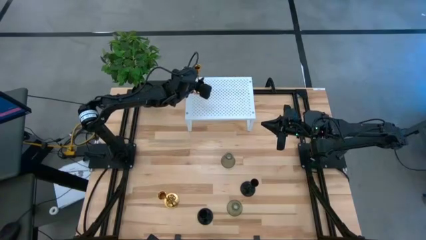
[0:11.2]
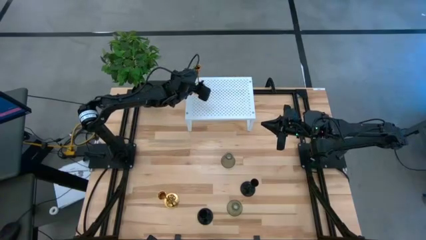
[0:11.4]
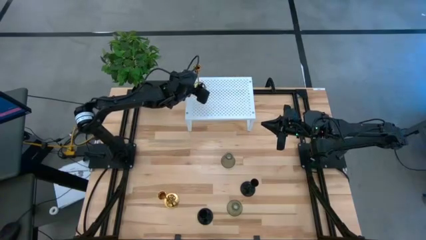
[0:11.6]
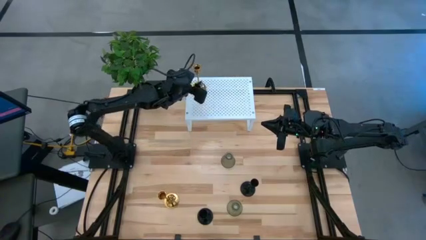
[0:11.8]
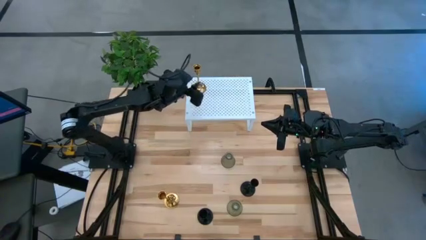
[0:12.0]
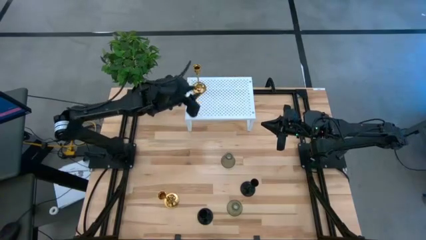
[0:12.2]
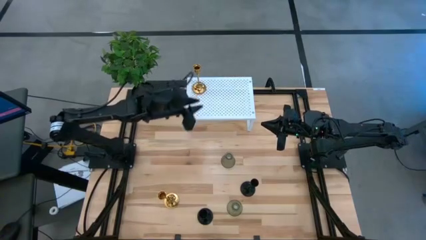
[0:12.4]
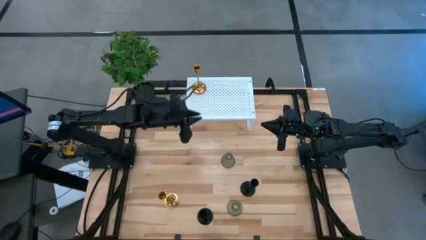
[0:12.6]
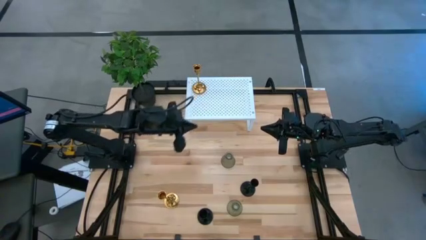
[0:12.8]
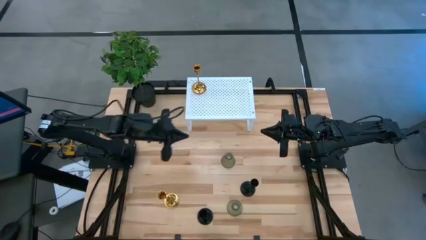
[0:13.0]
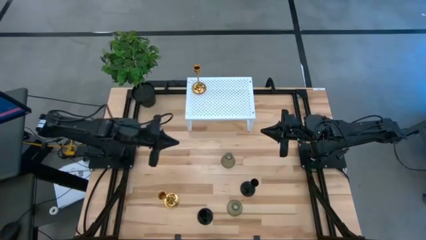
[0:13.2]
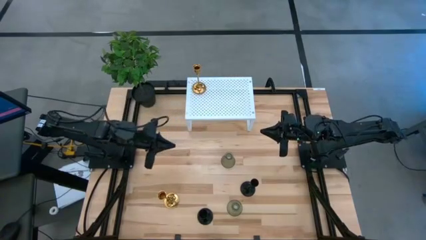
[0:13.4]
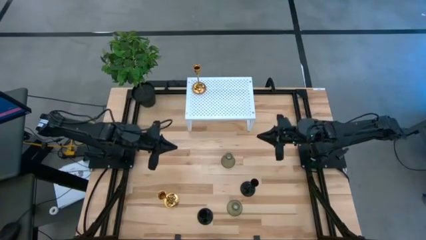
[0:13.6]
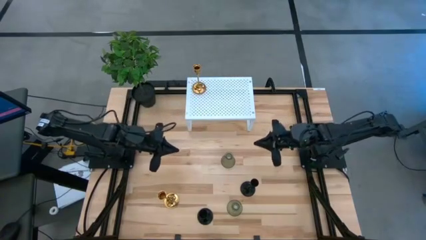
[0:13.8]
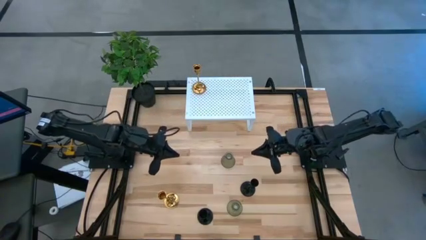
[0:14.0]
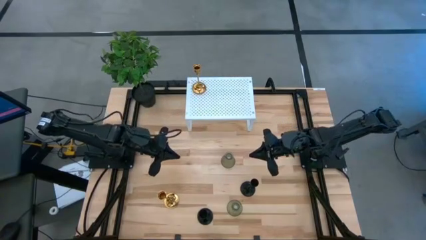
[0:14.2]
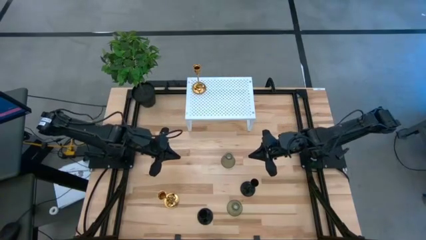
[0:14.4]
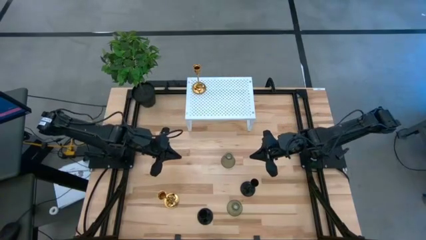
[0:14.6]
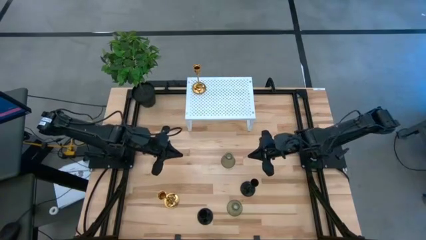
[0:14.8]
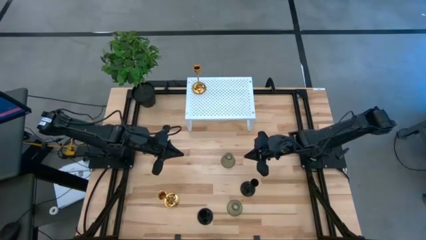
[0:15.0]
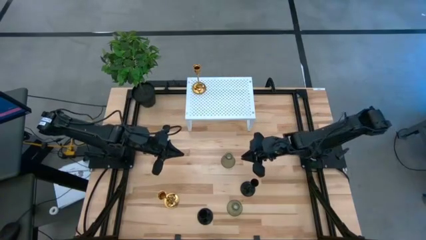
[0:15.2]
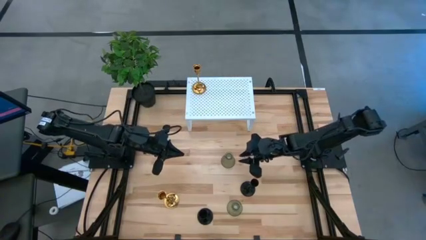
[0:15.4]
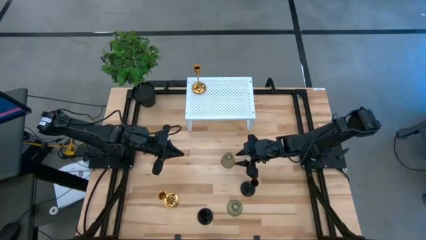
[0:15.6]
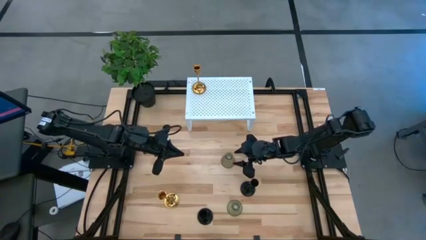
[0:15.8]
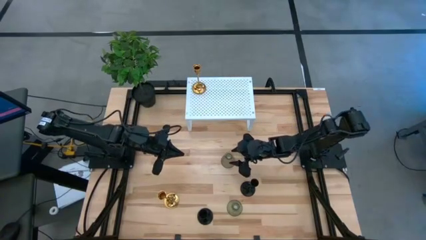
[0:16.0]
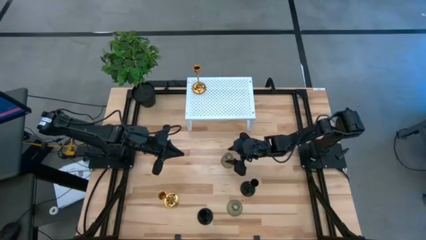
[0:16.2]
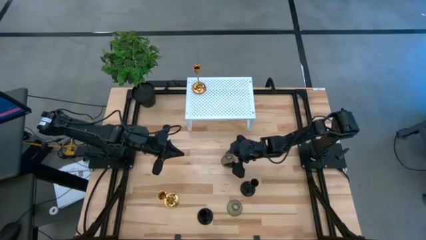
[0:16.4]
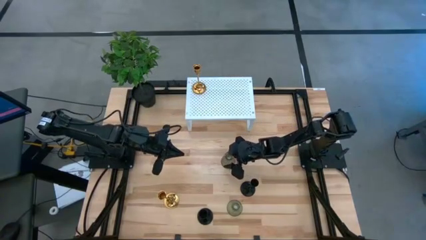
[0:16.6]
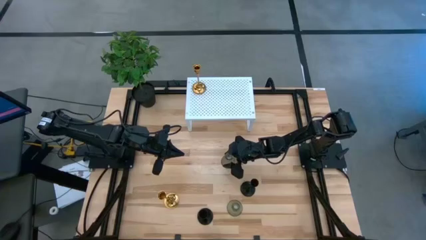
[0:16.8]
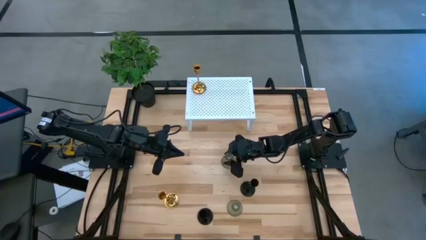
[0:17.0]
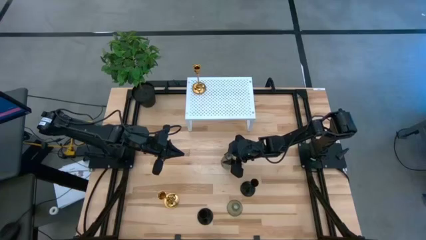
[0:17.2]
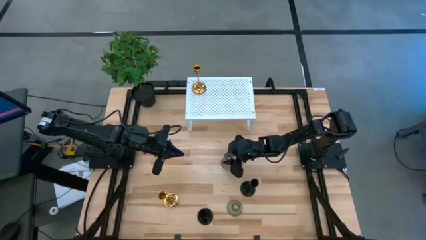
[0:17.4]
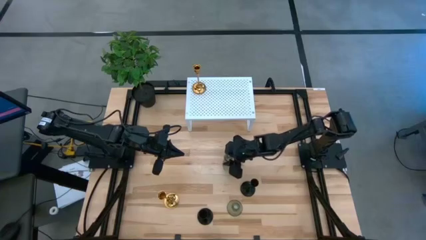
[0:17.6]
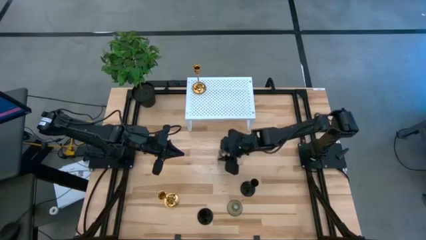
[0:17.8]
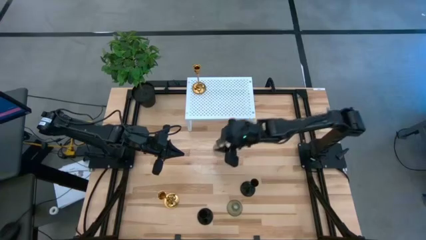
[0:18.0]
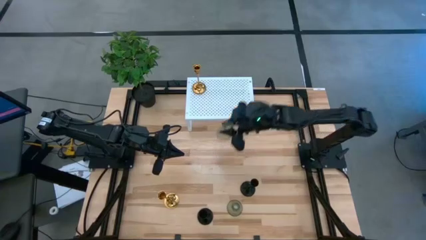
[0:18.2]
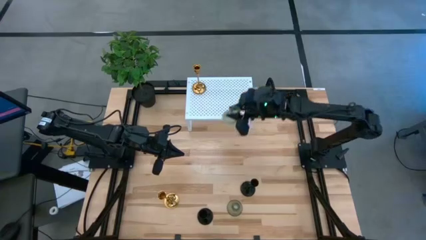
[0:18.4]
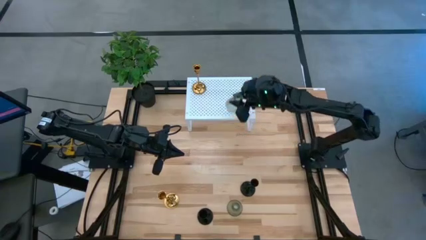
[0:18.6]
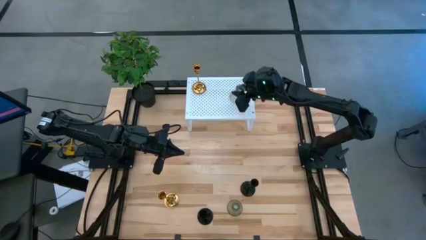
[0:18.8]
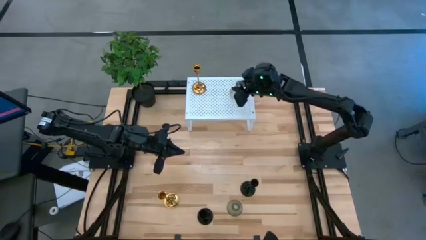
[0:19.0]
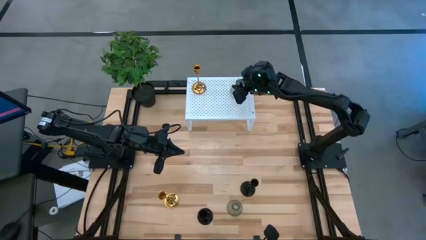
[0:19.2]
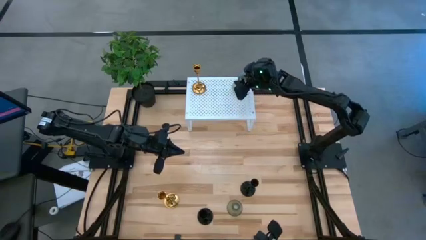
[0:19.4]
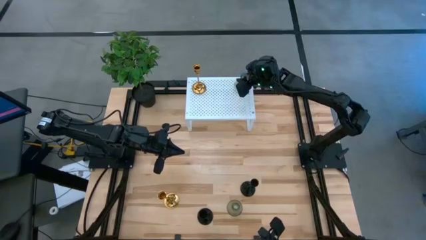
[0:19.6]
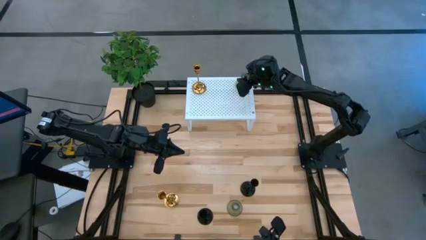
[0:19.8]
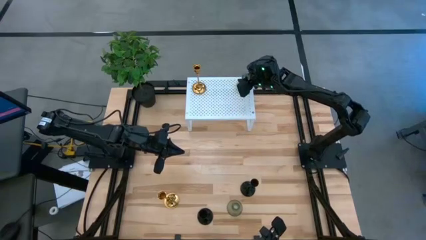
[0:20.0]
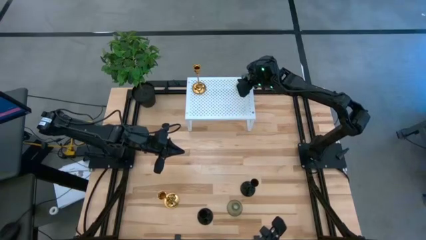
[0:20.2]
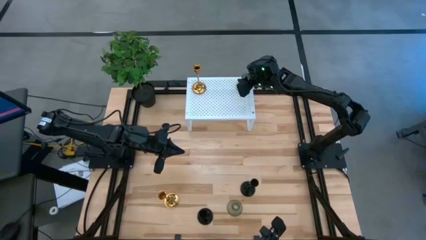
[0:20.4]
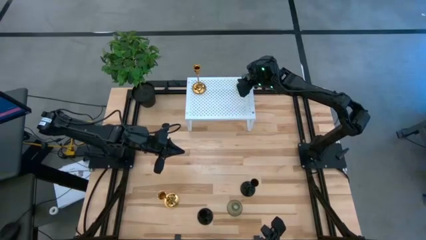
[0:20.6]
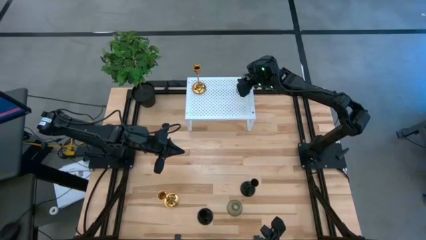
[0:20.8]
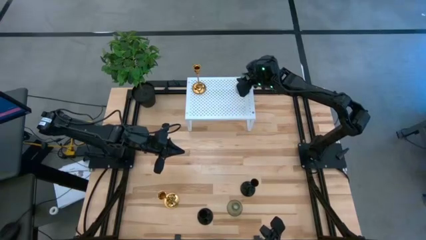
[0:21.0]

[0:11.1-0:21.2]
Task: Pick & Place candle stick holders
Put the top transparent candle holder on the shelf

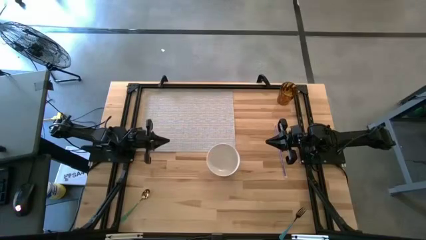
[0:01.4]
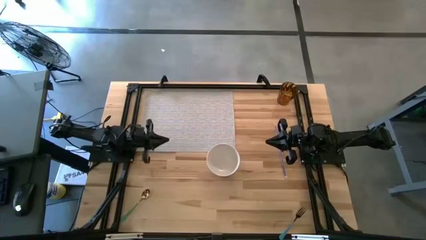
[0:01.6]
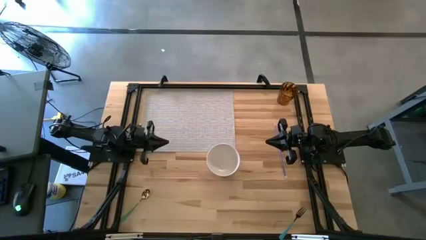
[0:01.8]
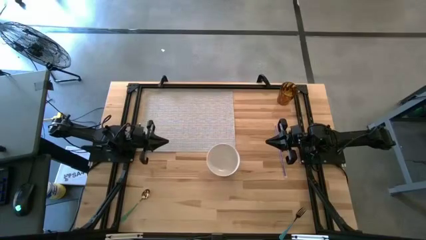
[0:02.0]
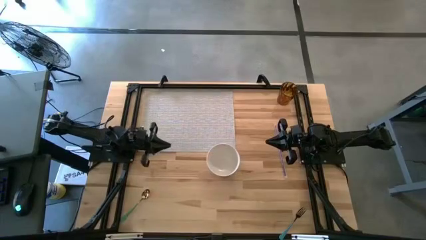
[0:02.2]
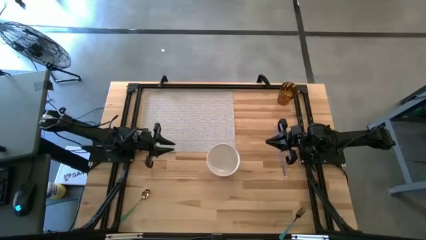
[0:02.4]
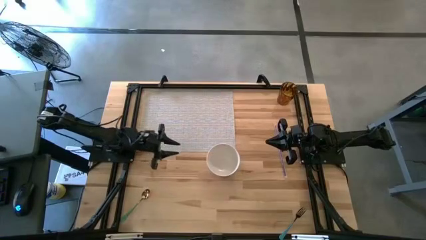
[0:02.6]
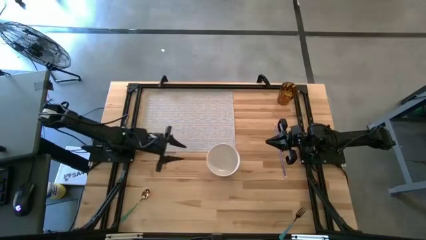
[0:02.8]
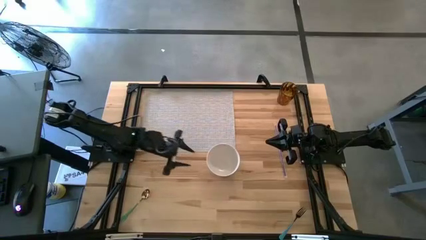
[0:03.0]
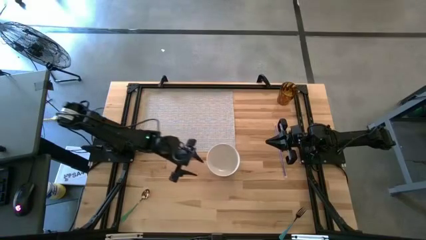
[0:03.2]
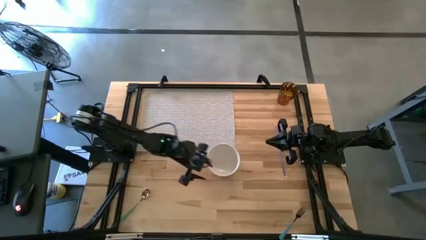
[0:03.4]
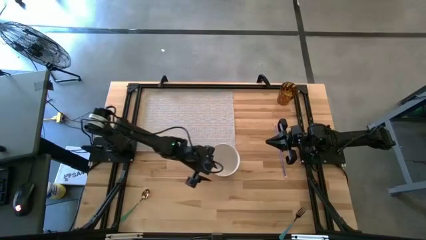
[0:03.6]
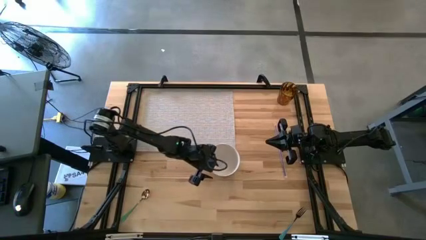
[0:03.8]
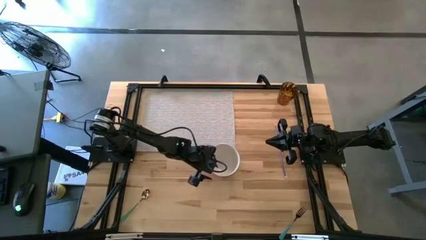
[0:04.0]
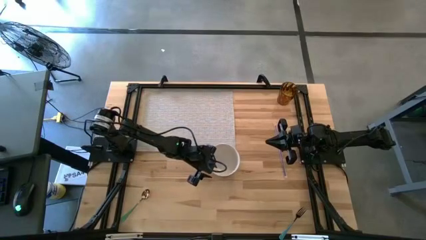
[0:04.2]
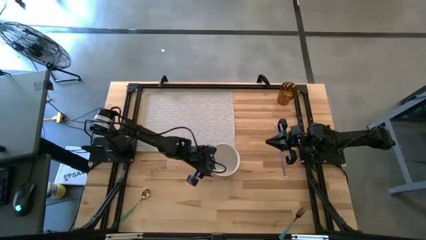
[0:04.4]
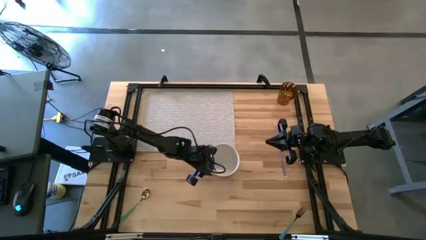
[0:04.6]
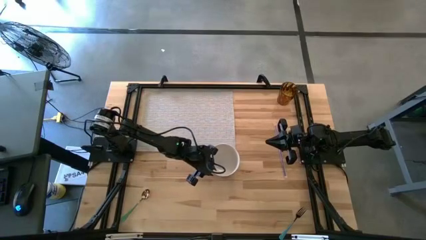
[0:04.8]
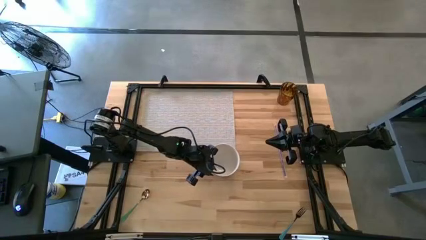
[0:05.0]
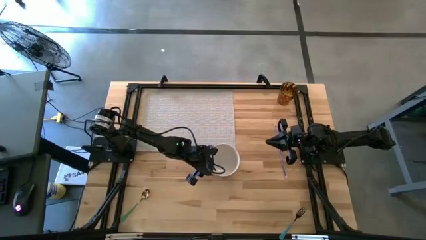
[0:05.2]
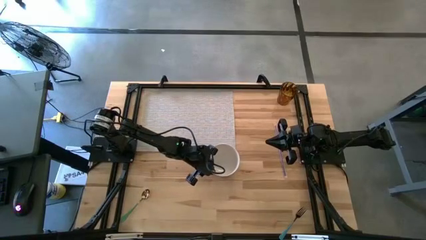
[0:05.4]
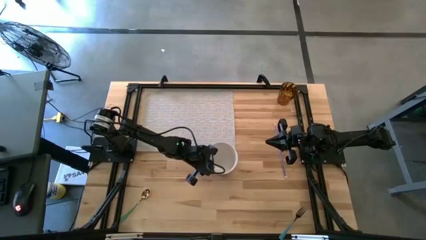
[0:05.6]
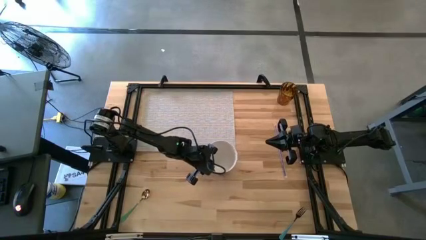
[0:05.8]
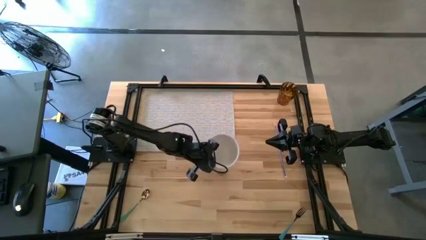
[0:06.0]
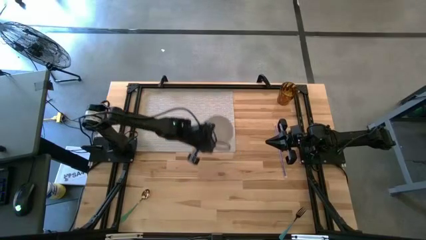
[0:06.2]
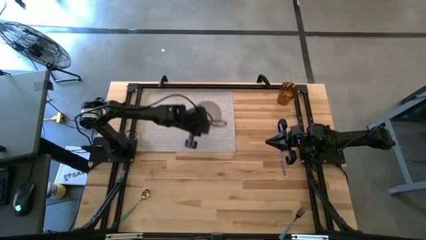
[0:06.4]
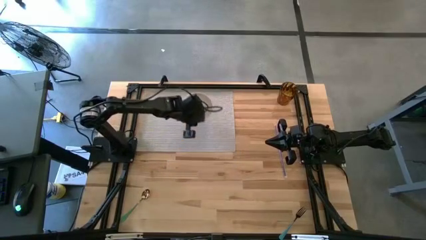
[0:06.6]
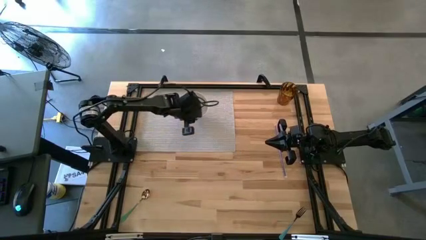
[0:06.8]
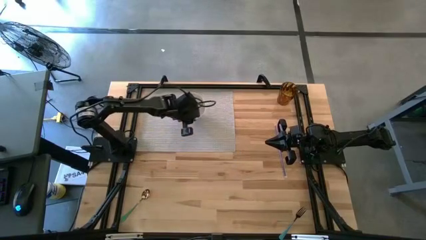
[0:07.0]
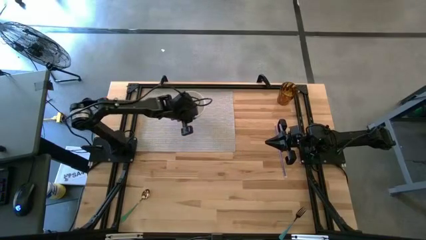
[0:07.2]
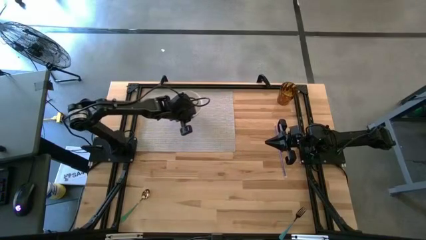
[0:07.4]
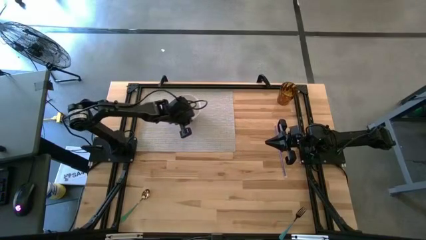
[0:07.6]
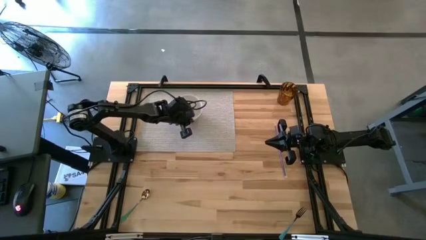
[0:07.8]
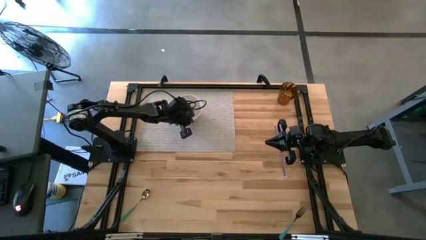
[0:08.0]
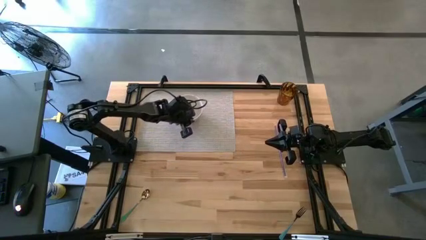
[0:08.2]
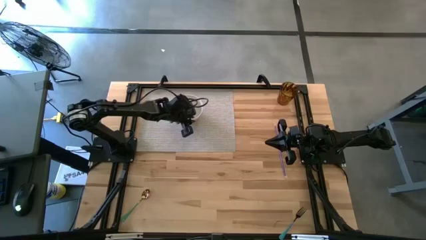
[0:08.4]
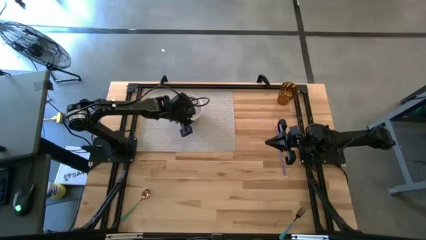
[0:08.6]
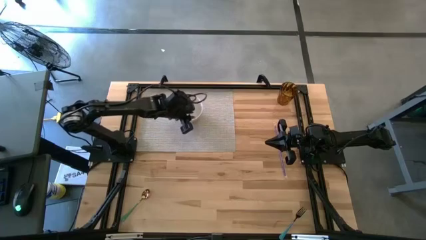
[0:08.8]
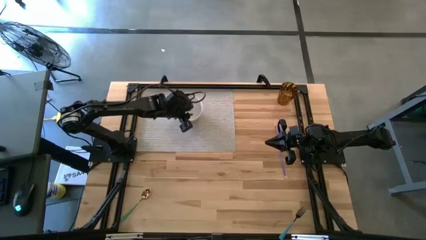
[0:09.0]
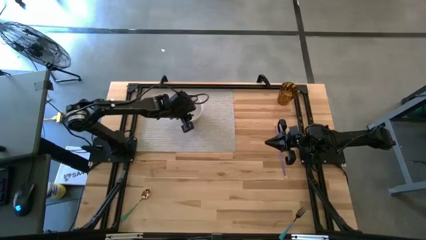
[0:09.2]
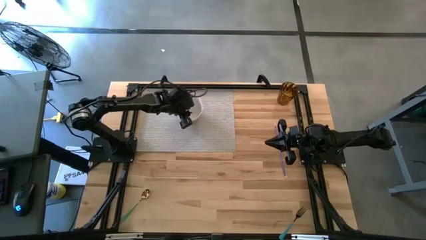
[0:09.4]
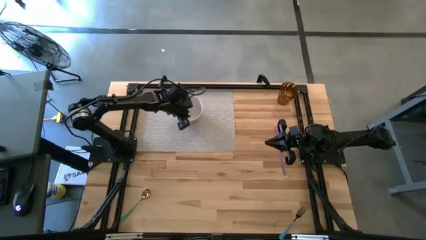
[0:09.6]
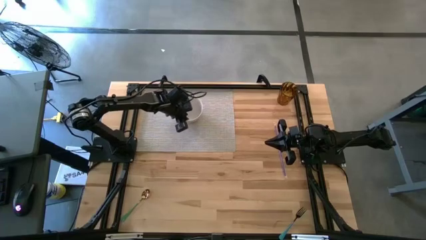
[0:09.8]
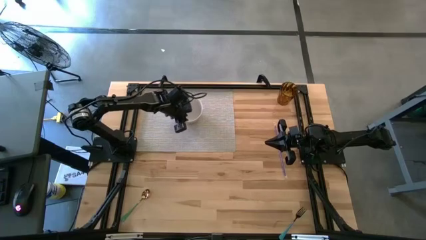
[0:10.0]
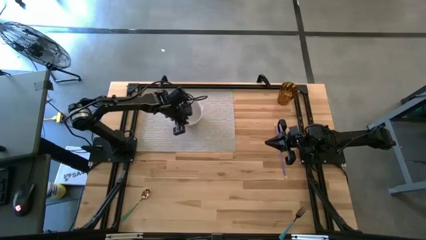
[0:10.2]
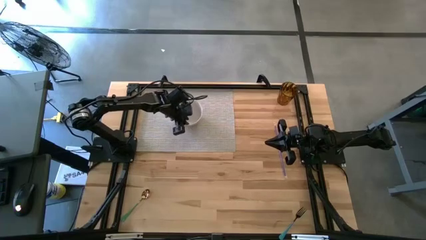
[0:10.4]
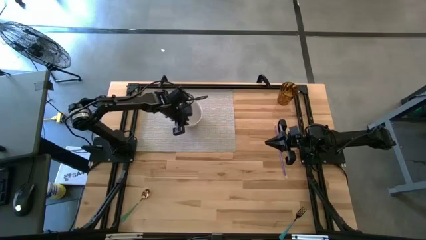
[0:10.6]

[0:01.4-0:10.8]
Task: Pick & Place Utensil
Put the white bowl on the center of the gray mat
